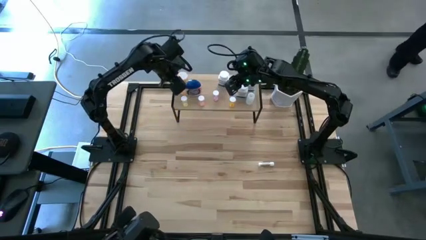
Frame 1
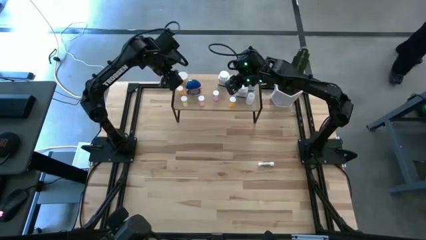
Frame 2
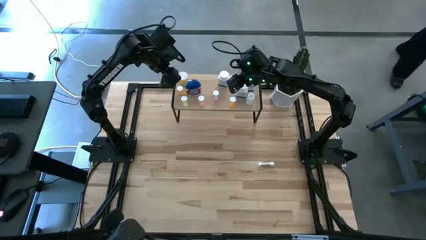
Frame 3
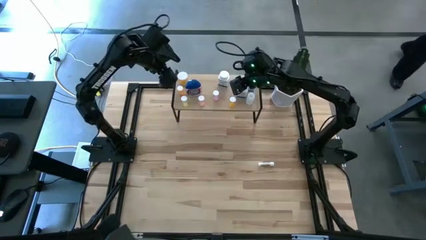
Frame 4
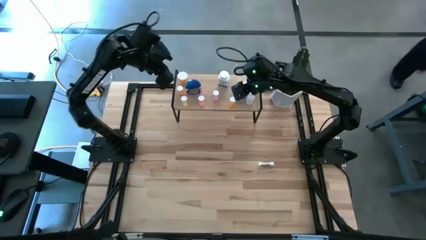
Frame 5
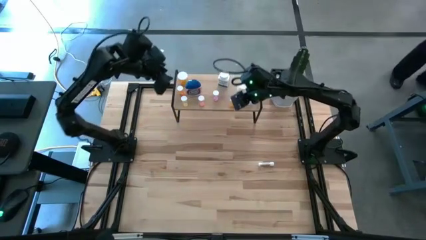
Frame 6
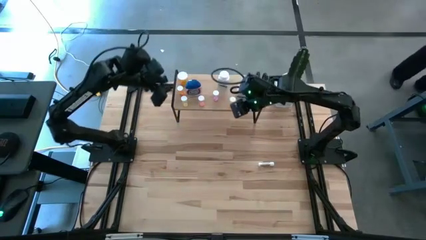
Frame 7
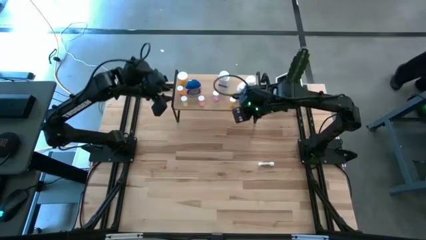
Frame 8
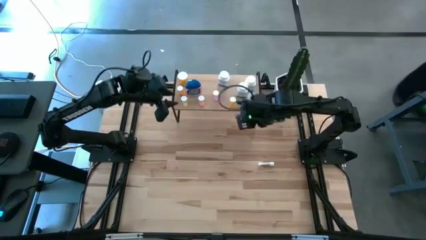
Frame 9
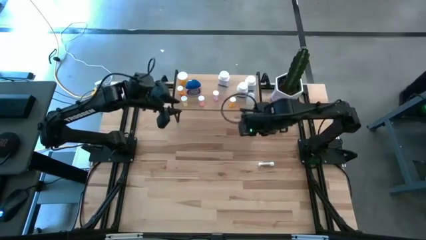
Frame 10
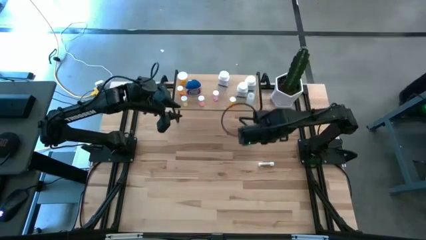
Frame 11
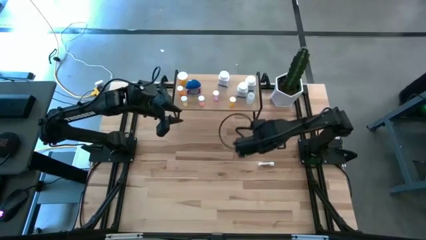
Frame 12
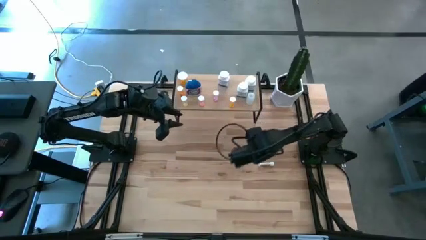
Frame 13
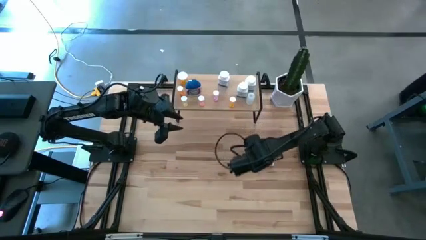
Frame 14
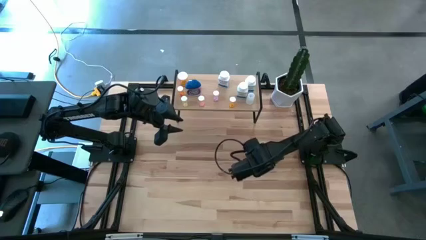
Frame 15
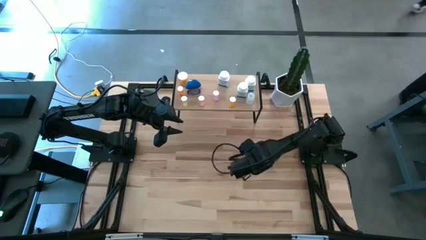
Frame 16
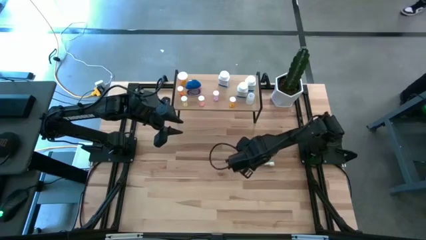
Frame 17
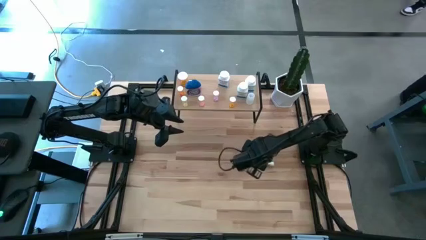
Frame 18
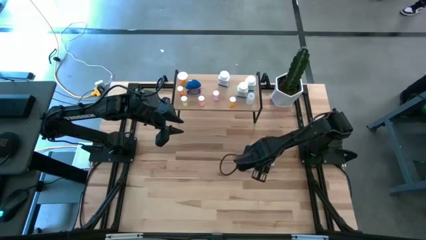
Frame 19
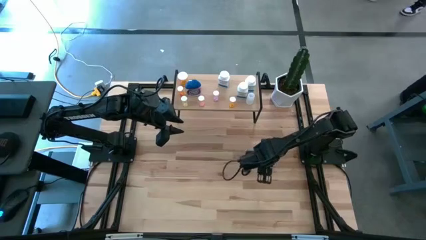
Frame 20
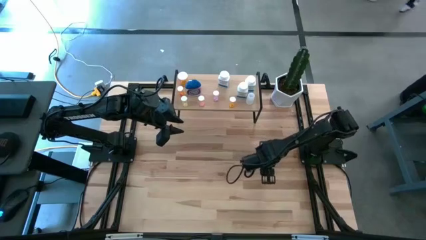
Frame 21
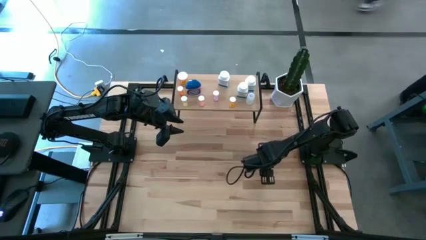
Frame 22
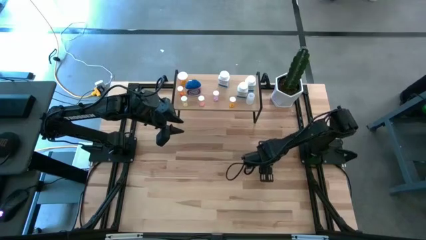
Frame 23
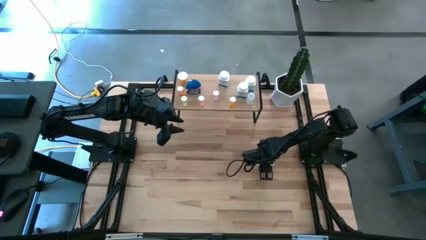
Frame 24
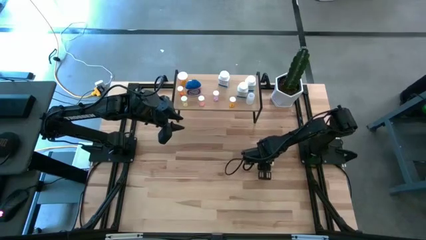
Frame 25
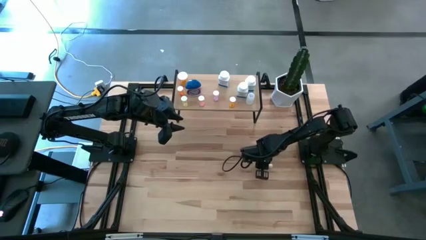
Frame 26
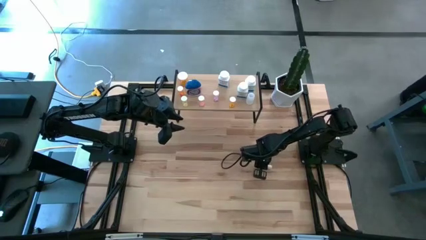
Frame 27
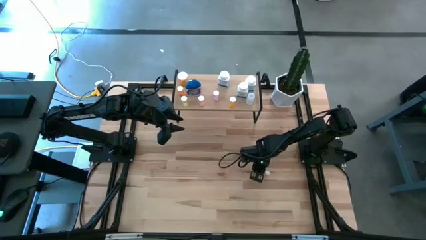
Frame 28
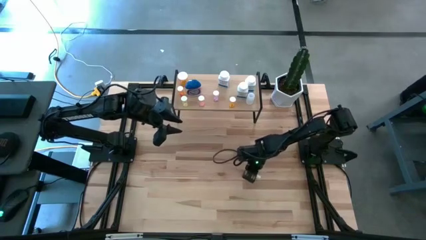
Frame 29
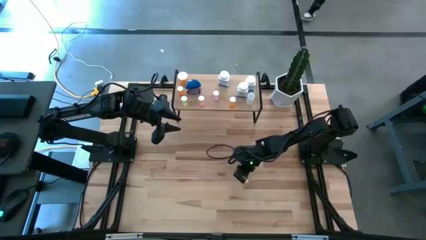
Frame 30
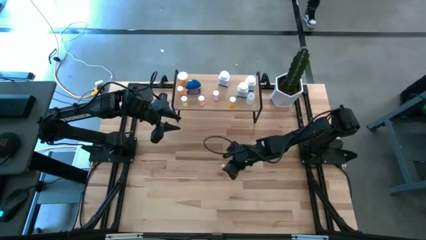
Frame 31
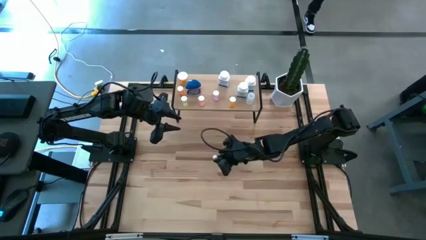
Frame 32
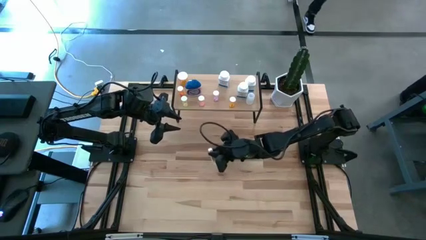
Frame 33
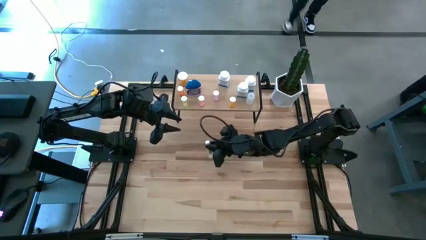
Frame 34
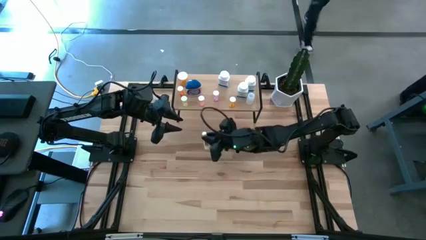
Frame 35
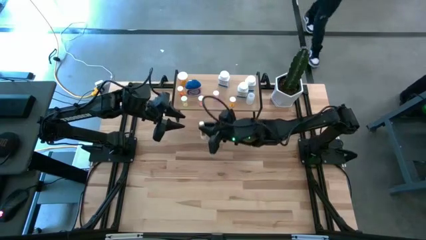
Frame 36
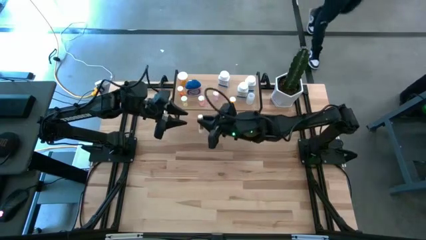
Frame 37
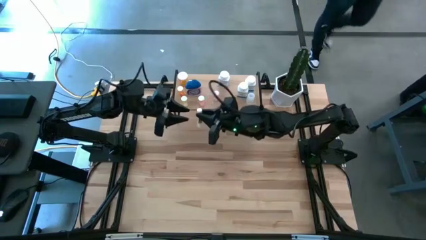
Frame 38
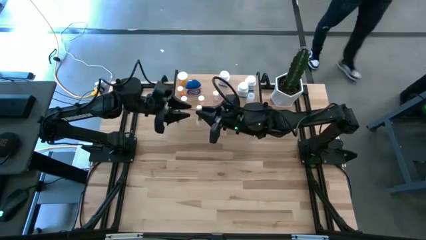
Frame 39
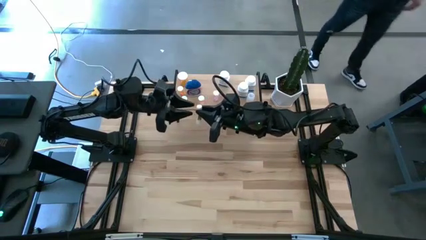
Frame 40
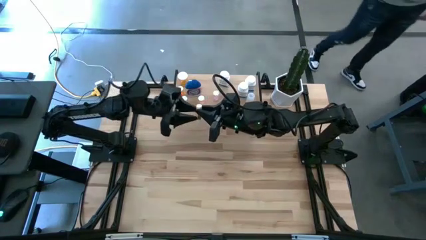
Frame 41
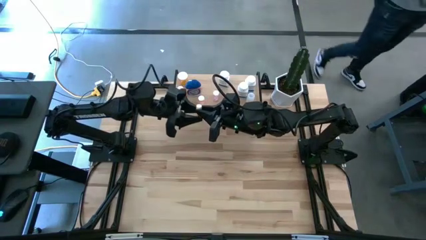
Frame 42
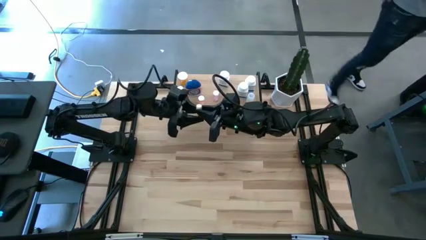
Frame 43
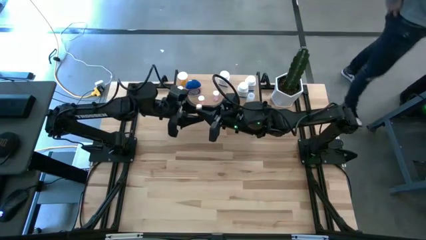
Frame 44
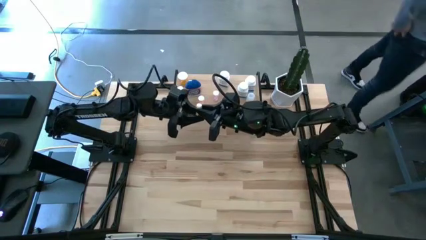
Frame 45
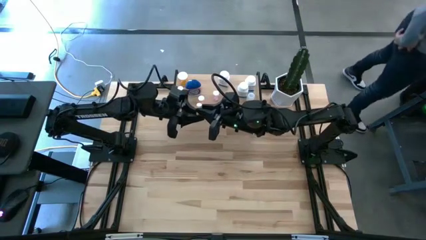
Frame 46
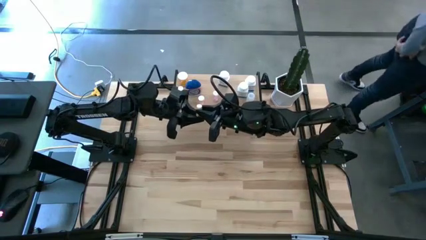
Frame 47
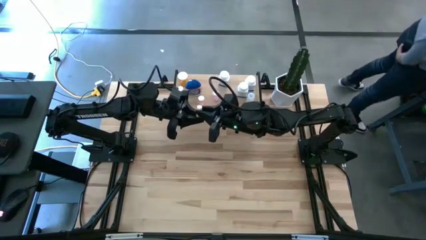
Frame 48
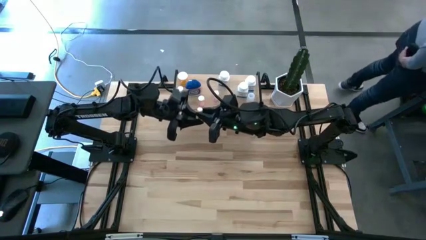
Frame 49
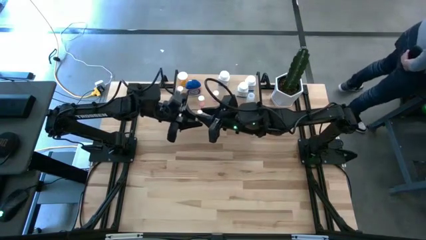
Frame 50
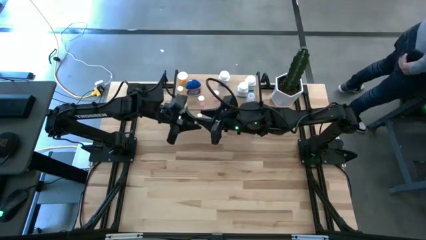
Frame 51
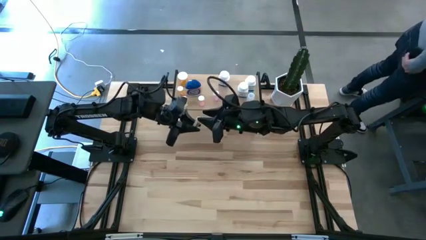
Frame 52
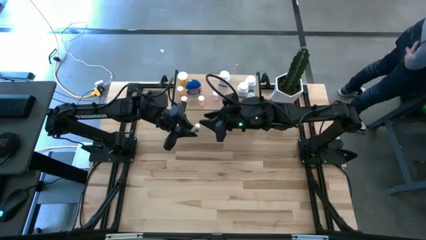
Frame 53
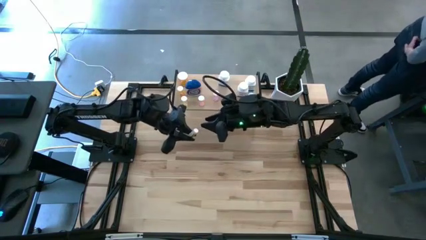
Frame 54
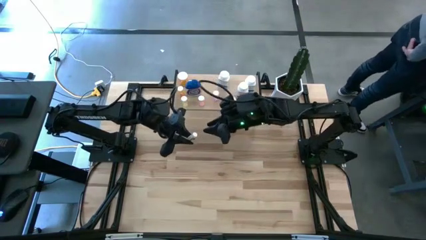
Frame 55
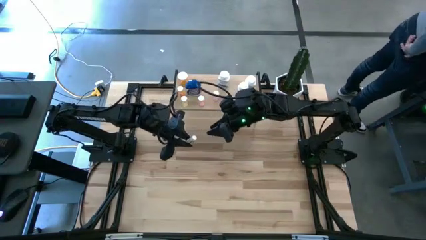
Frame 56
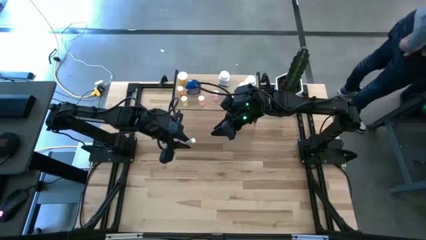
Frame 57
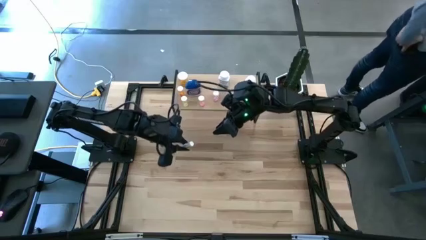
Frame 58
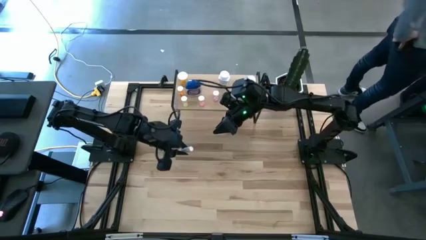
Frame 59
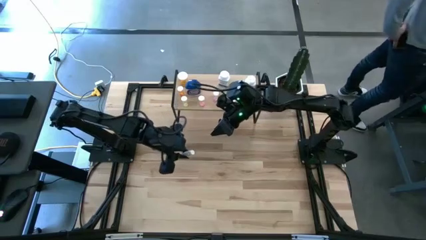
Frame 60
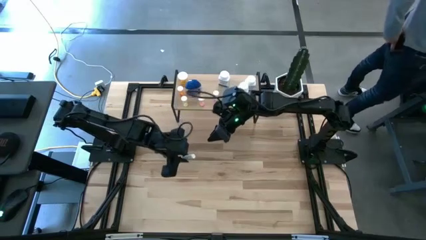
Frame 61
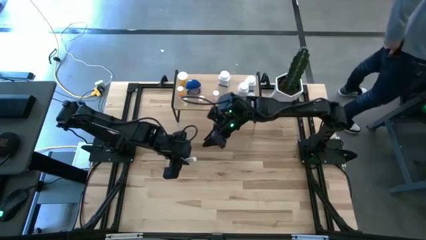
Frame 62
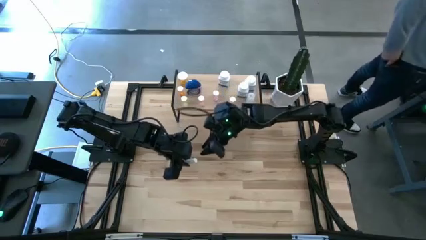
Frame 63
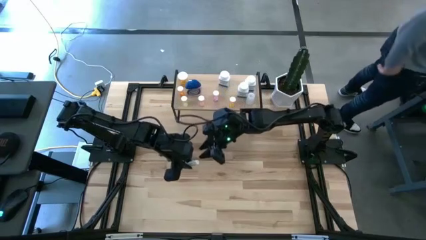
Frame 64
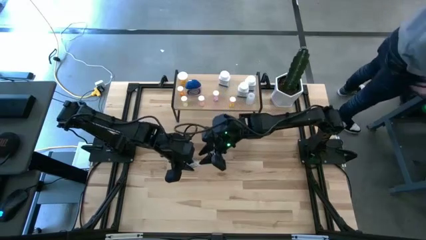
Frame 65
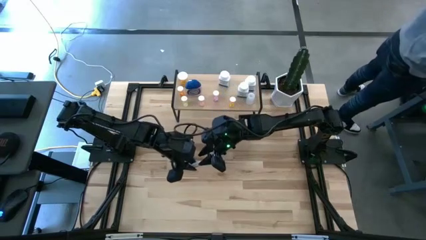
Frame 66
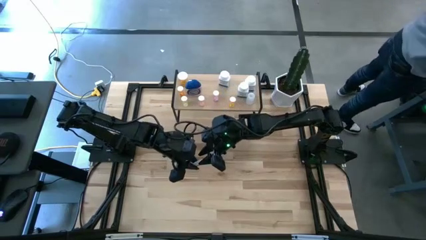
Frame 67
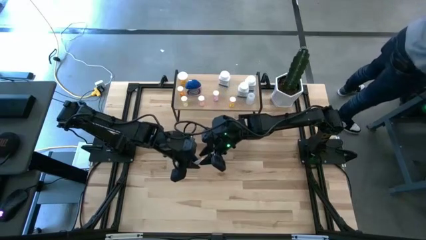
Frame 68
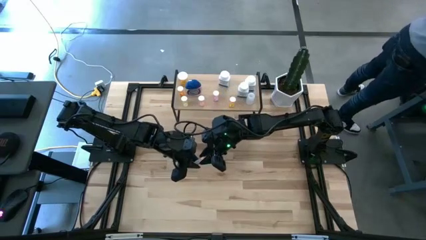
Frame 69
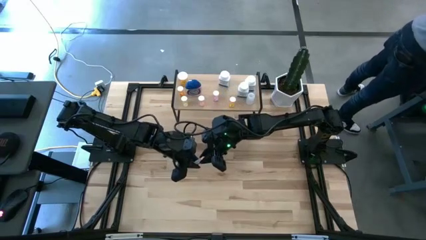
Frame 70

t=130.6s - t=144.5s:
Task: Pick and place medicine bottles onto shelf by color
Put the white yellow pill bottle on the shelf

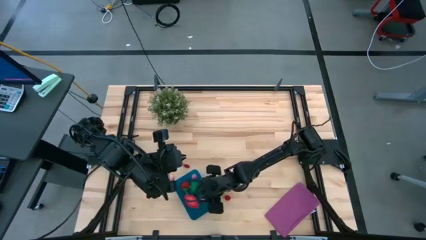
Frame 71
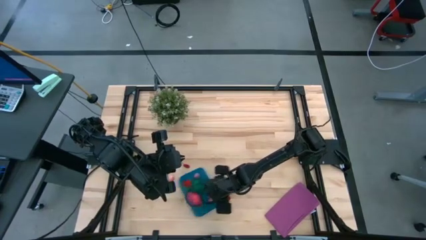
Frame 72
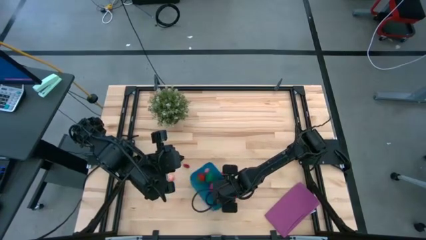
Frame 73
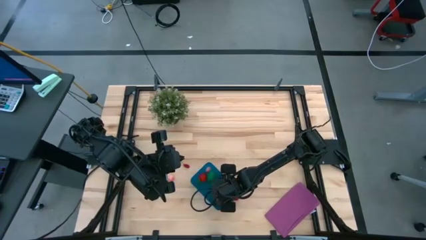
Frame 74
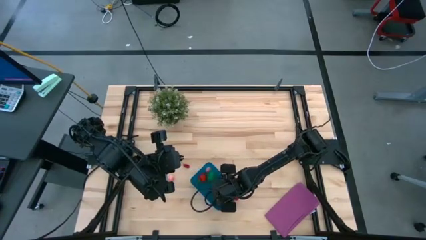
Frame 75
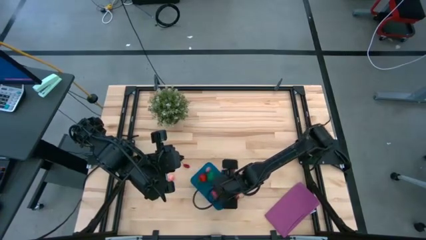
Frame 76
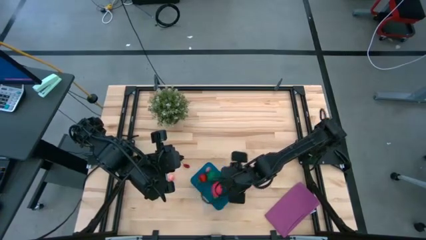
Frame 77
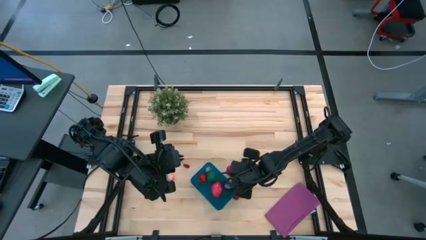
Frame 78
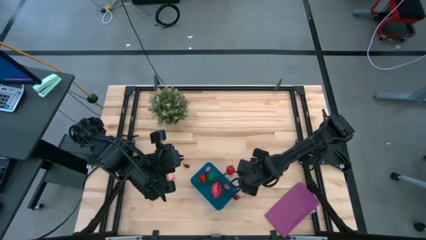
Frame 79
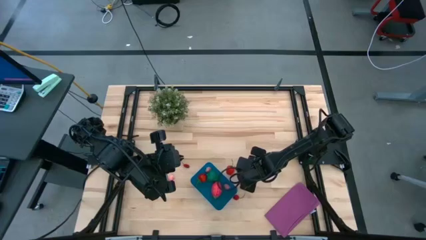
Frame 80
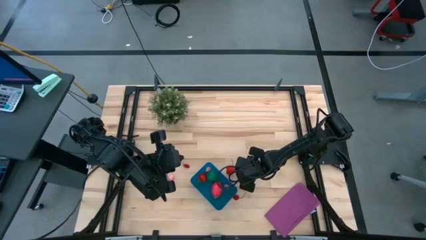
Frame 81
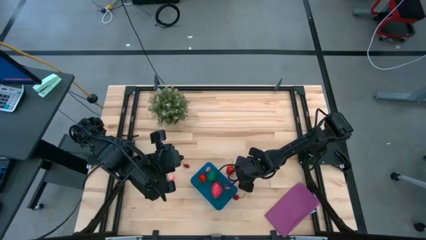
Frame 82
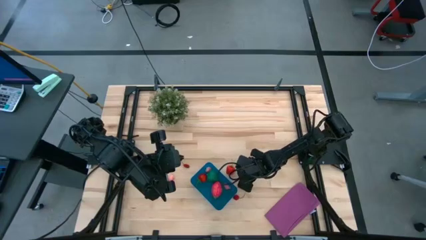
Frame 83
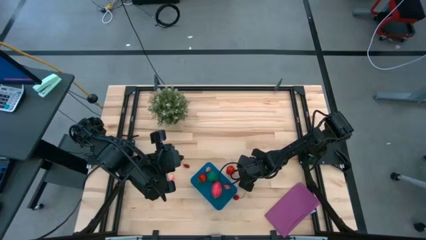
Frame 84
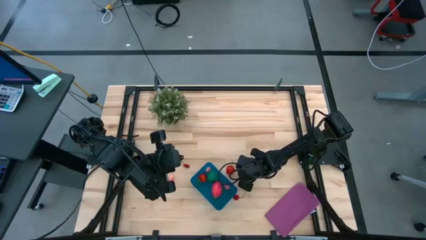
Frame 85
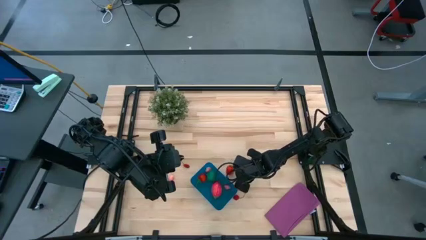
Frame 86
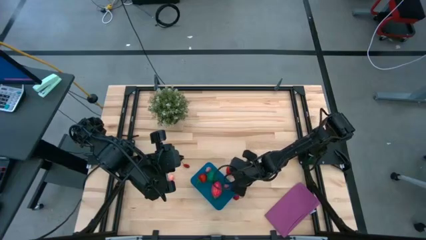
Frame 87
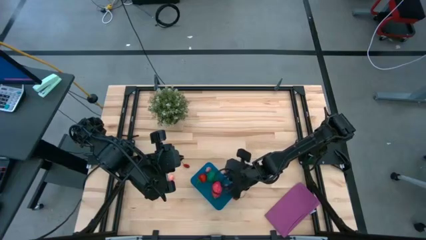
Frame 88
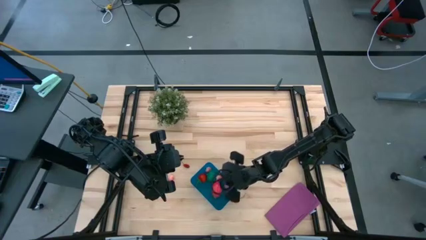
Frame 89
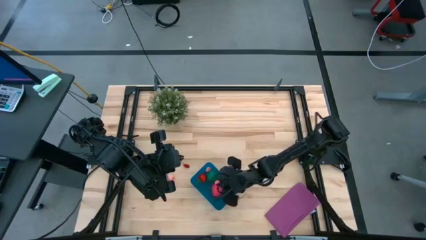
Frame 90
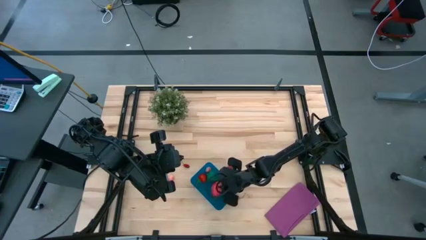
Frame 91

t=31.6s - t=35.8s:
Task: Pick and placing Produce into tupperware
Put the pink peach into the blue bin
